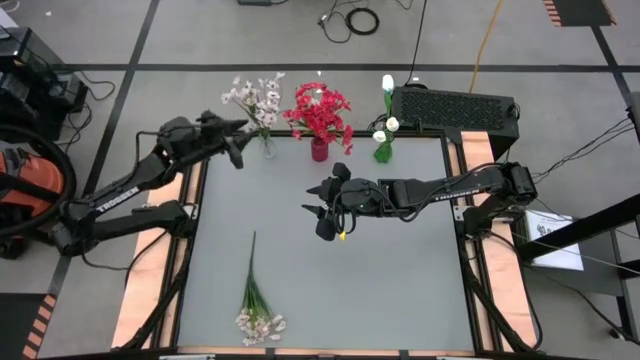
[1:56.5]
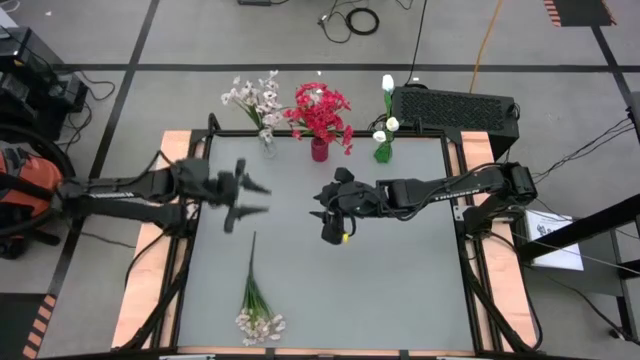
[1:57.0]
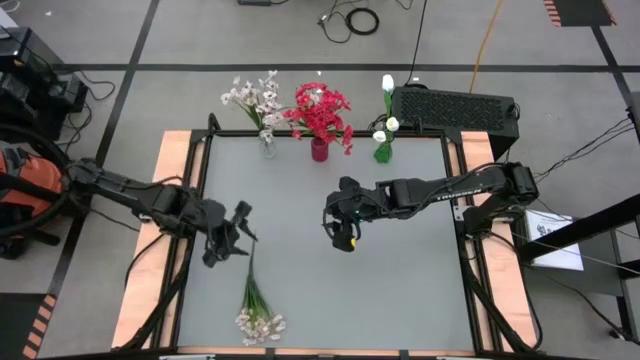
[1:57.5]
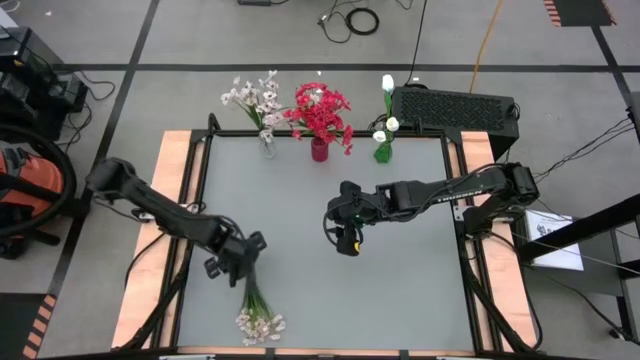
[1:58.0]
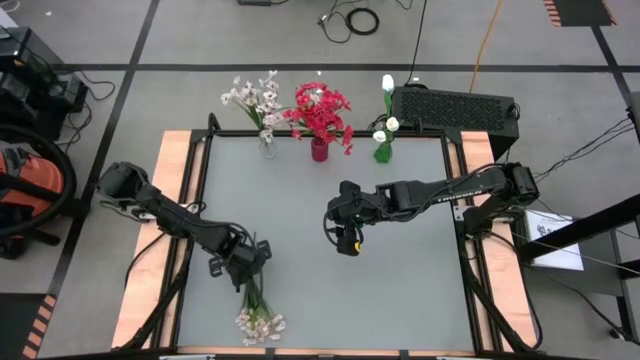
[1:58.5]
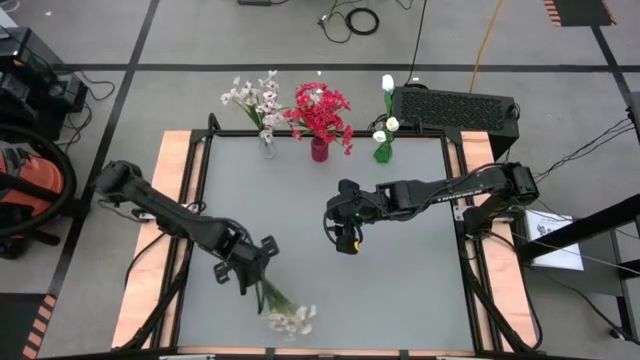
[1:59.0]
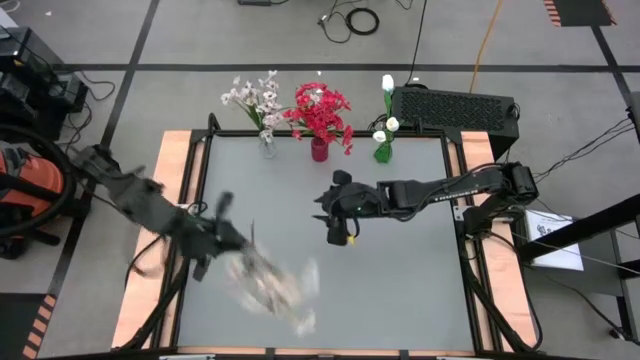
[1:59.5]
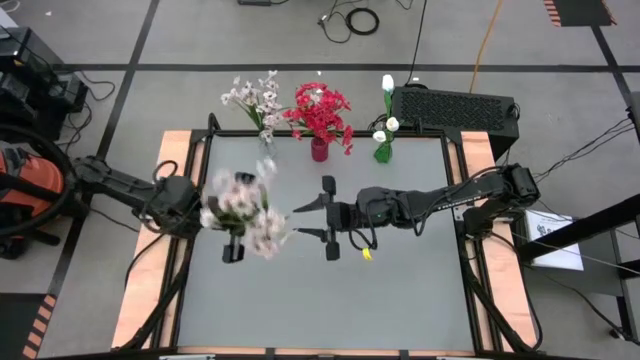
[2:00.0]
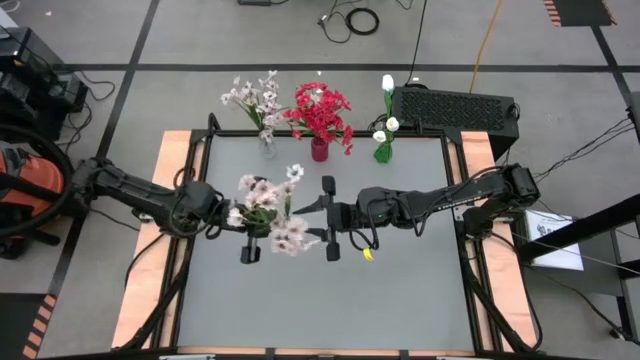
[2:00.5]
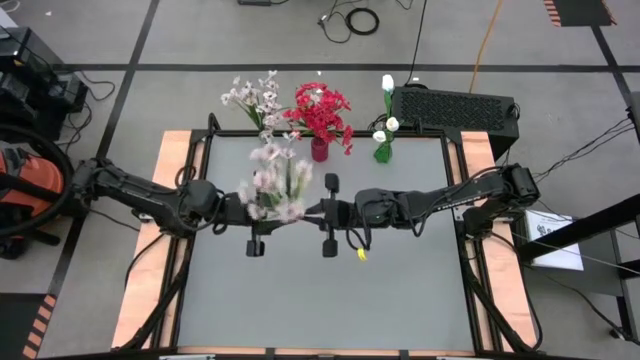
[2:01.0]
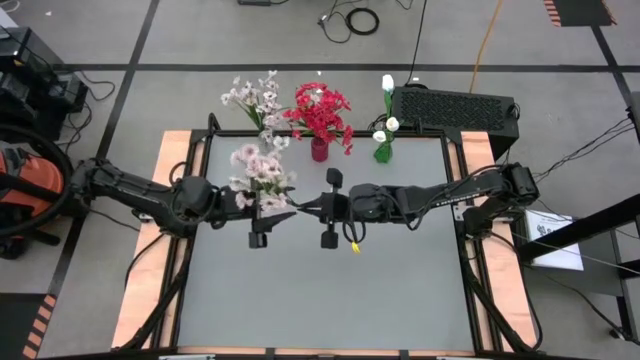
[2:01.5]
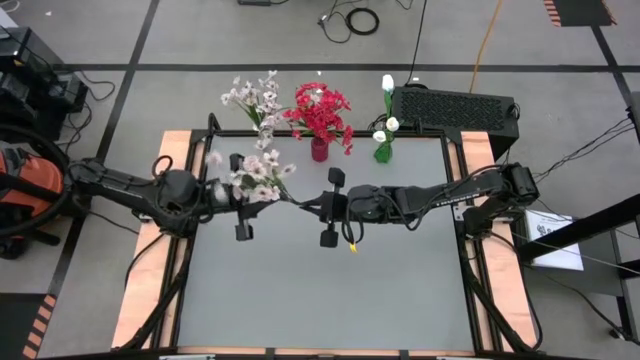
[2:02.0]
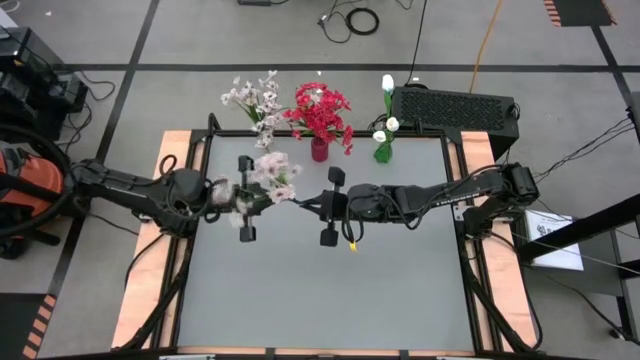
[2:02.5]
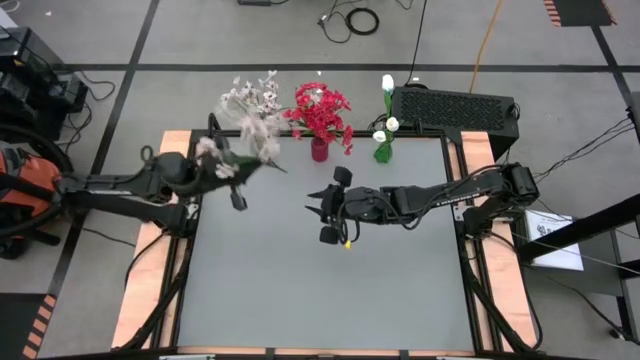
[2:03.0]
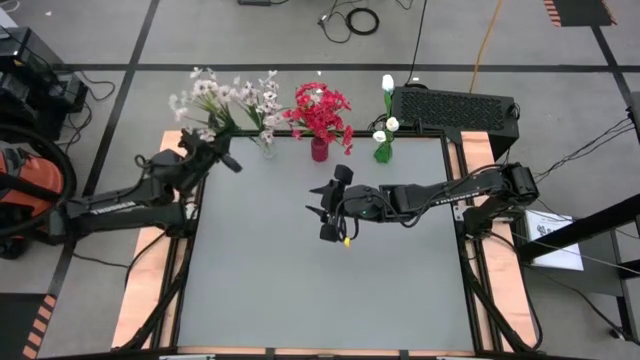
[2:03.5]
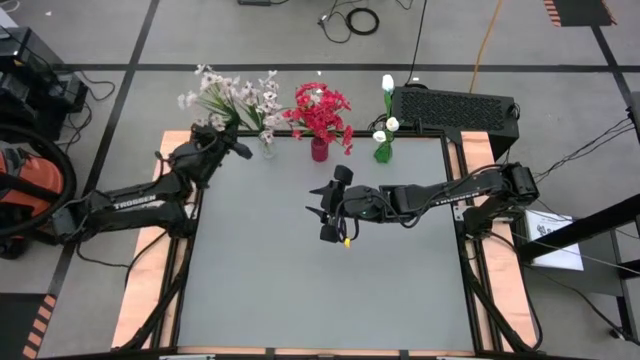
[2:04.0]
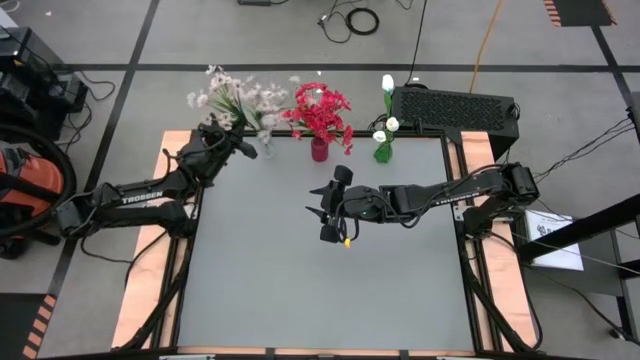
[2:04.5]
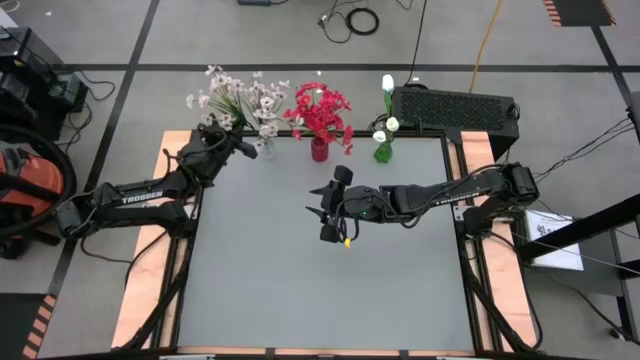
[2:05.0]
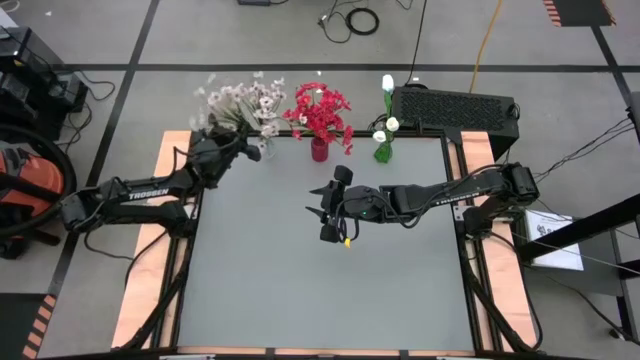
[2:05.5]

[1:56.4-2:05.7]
Task: Sort flowers into vase by color
Put the white flowers into the transparent vase

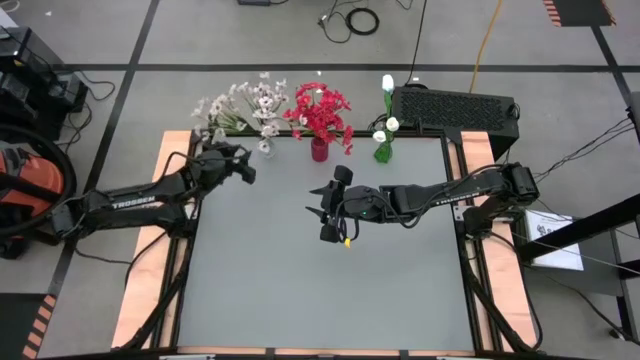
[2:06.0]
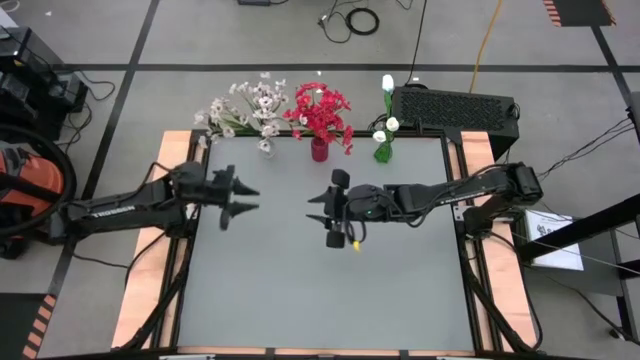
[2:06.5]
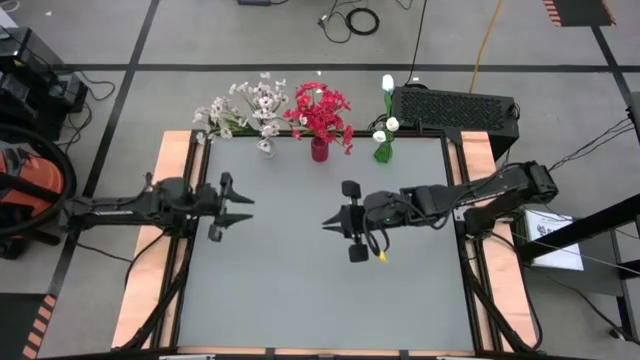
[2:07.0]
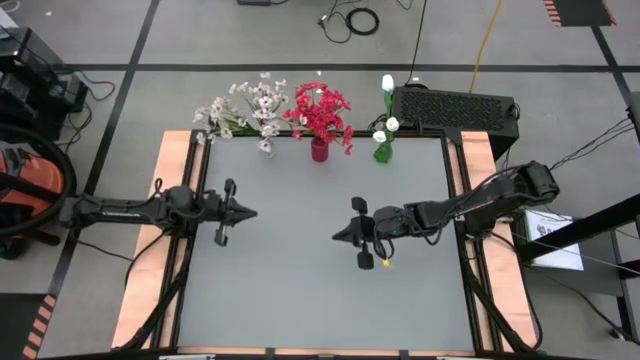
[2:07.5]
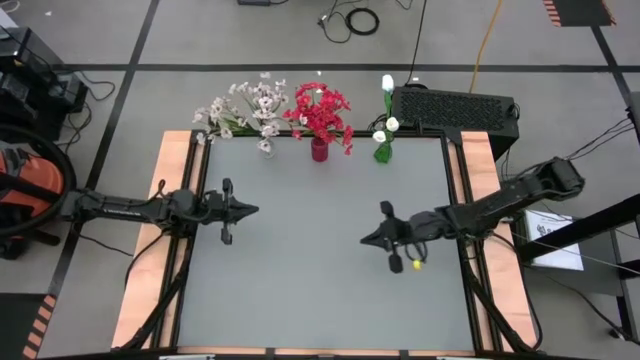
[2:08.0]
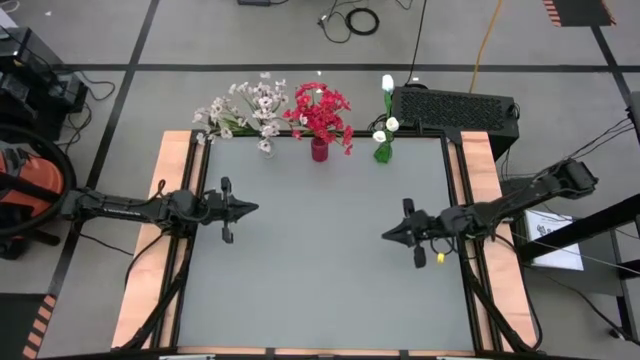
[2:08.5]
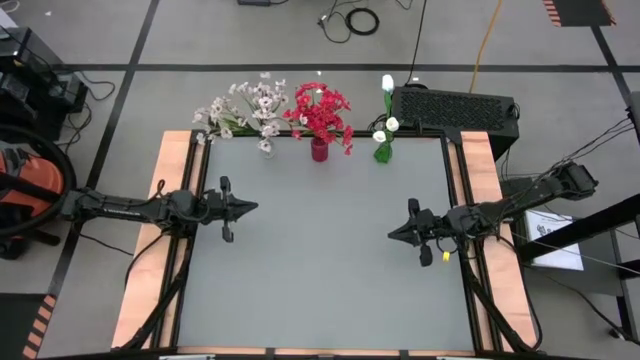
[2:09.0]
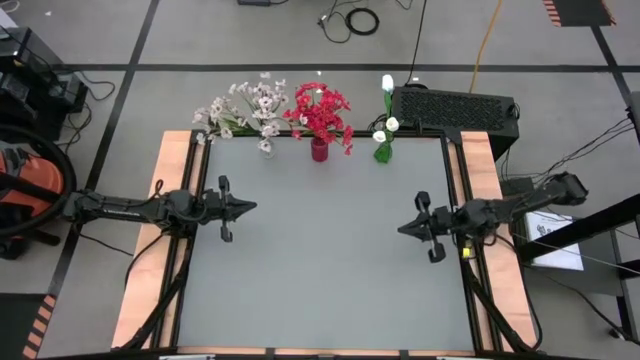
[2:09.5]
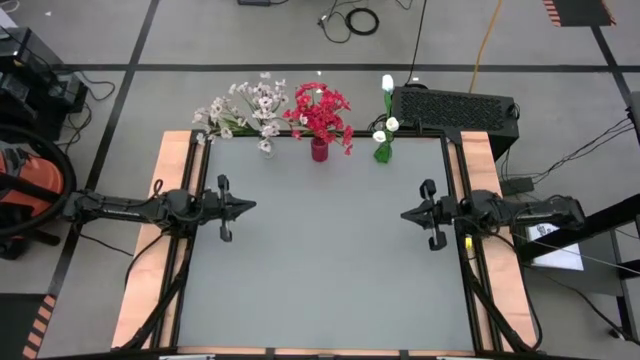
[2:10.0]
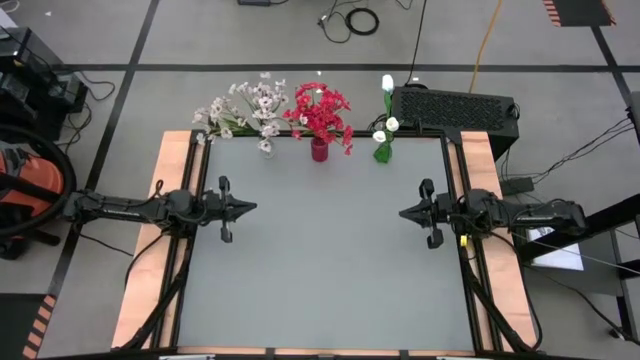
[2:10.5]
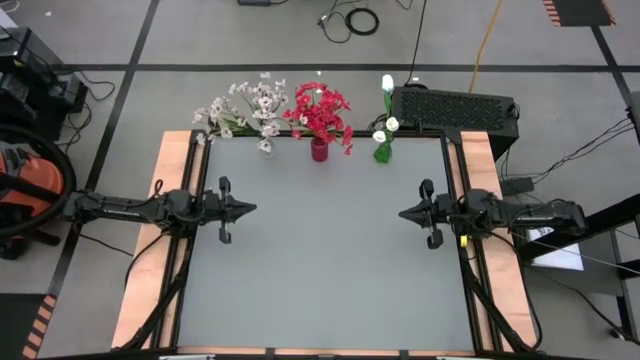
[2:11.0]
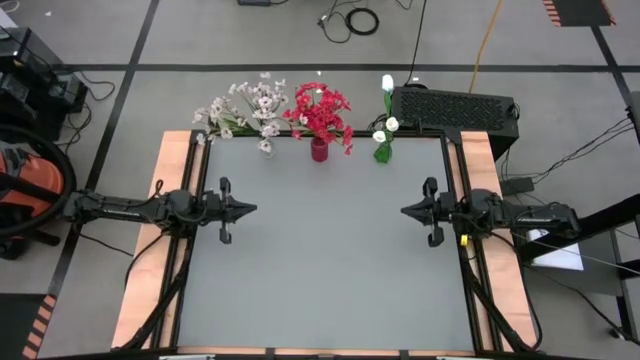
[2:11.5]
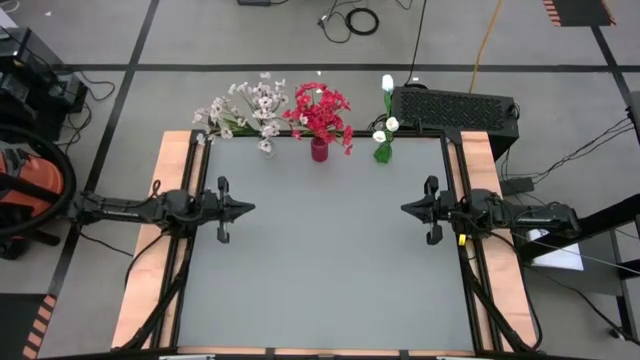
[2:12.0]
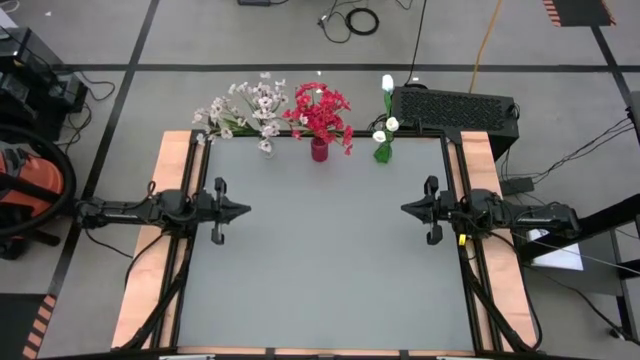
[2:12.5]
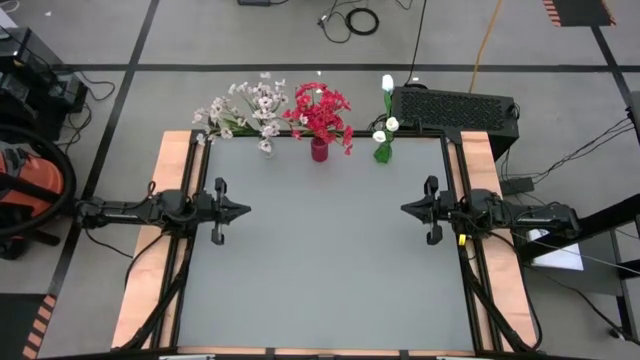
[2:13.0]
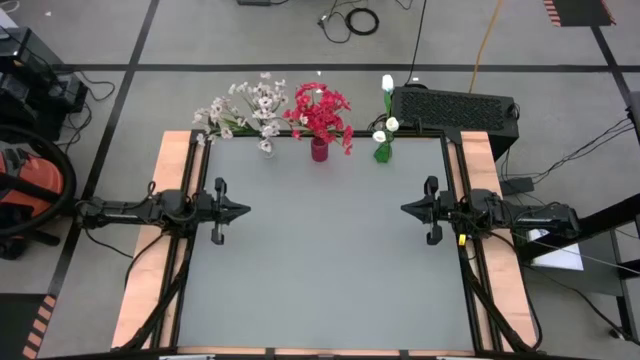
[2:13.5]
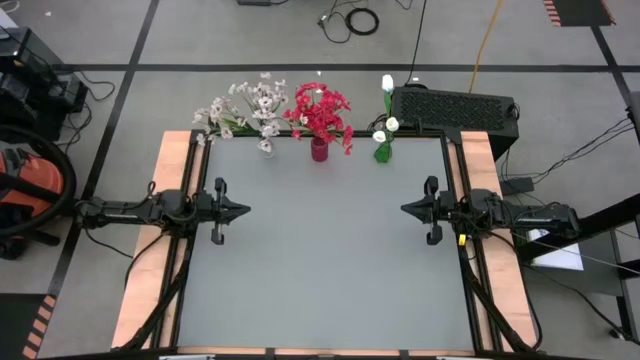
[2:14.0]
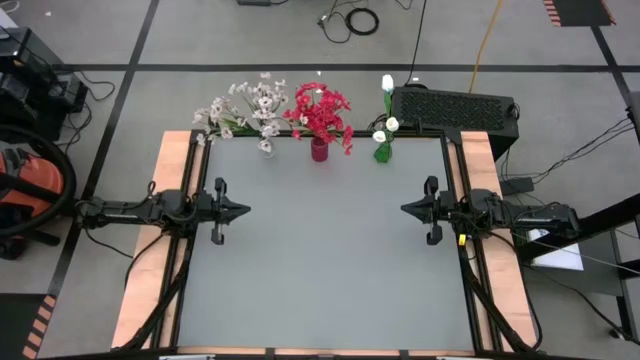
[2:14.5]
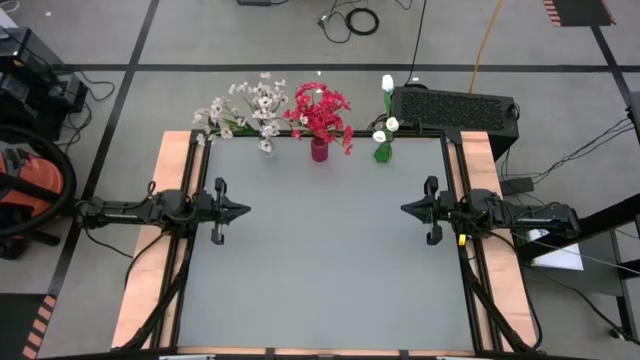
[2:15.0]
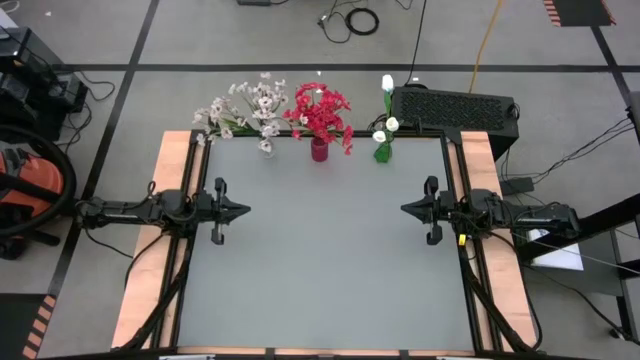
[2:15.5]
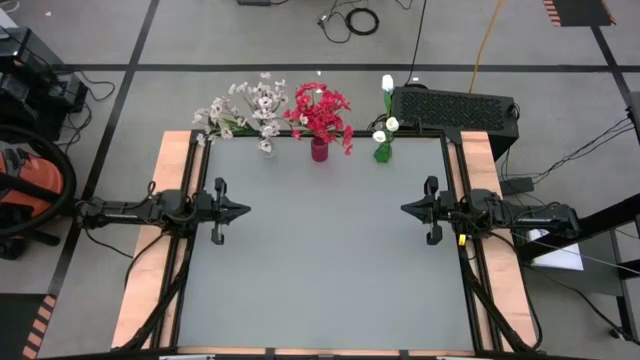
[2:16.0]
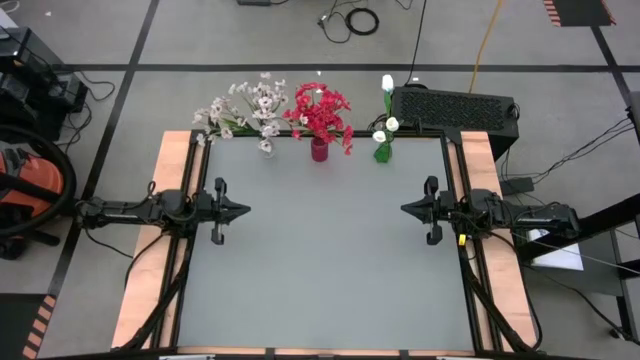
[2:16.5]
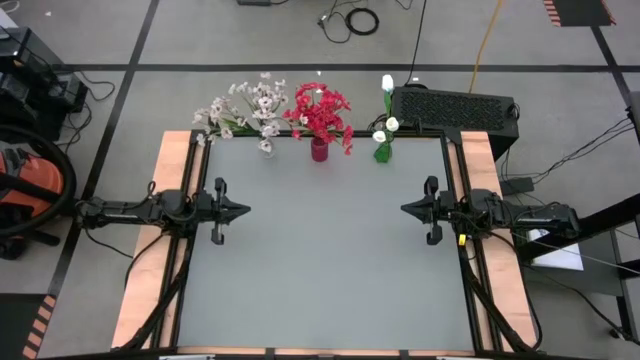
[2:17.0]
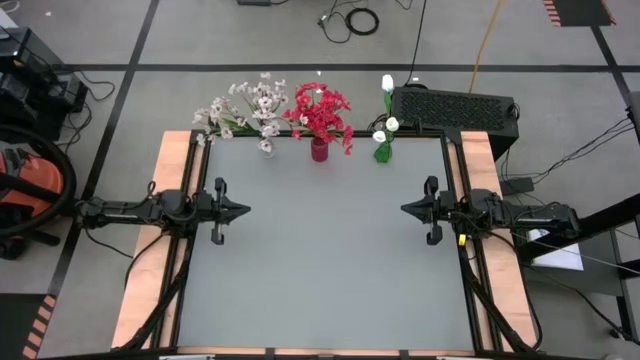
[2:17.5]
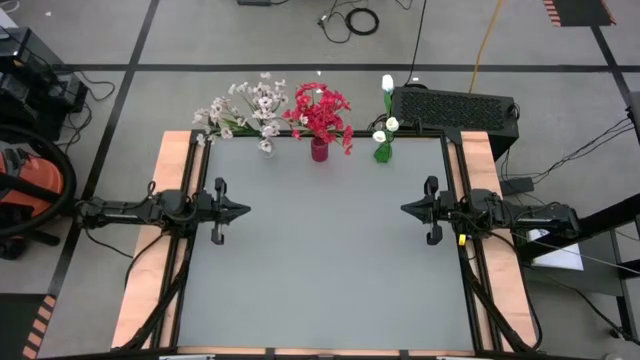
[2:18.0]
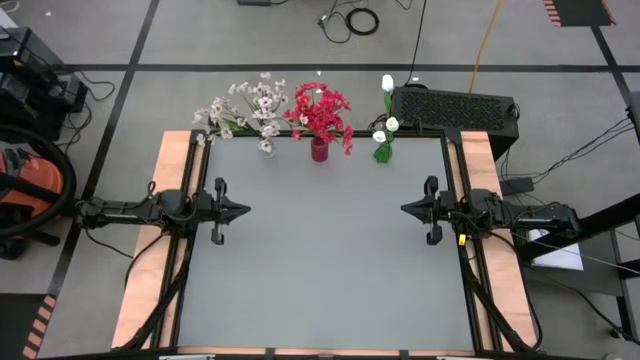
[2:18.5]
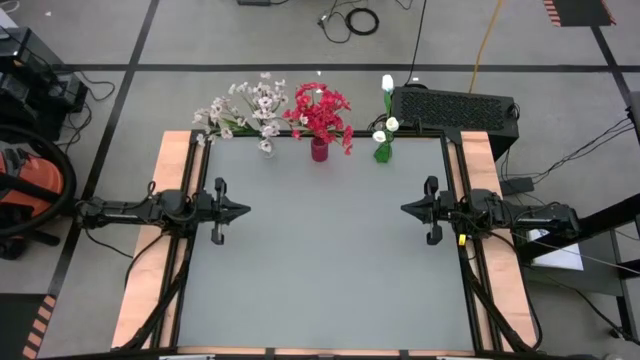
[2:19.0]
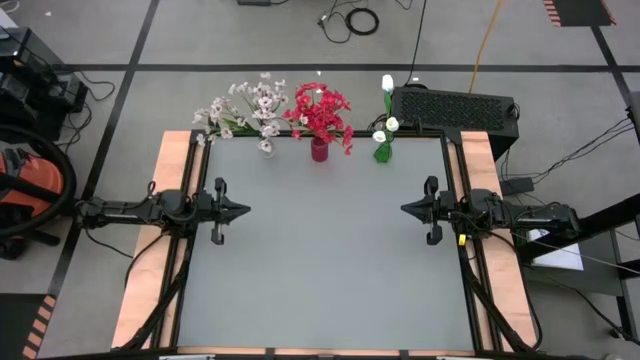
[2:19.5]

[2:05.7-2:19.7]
Return to Home Position
